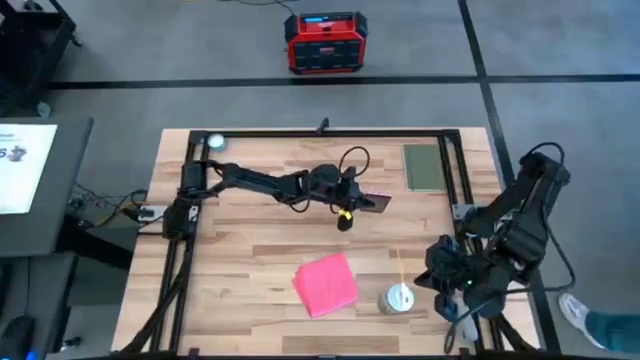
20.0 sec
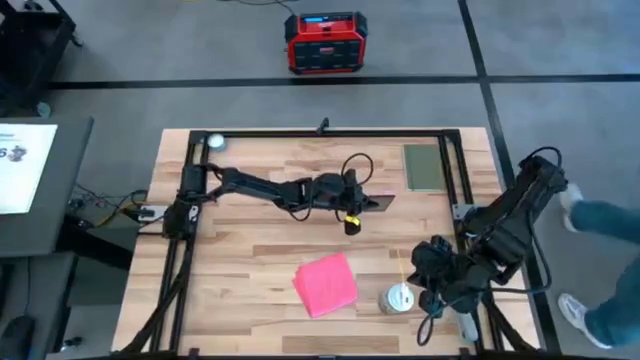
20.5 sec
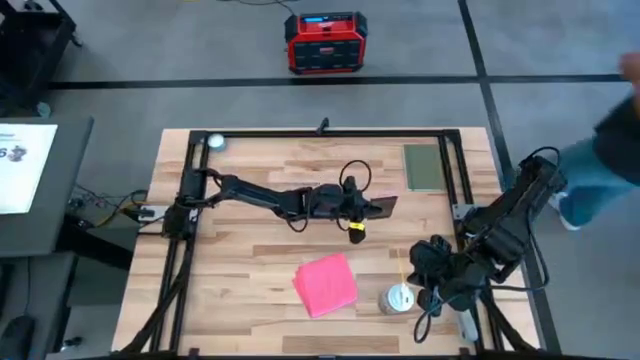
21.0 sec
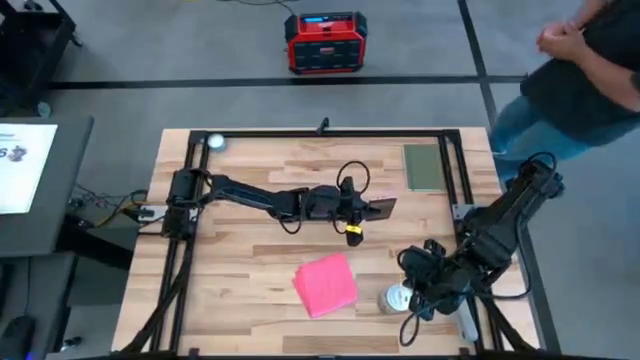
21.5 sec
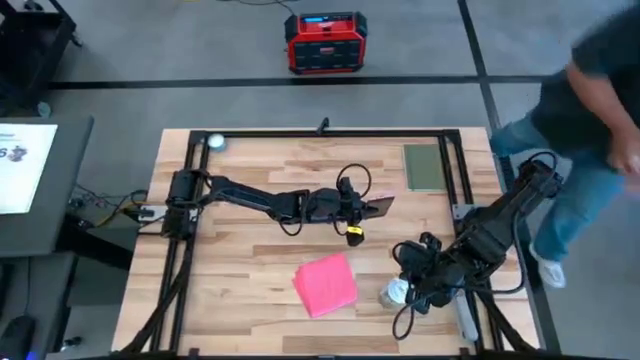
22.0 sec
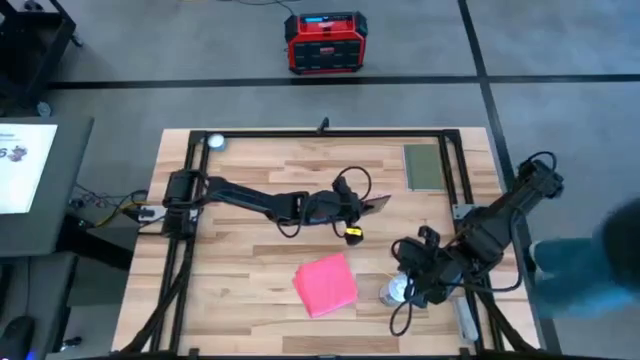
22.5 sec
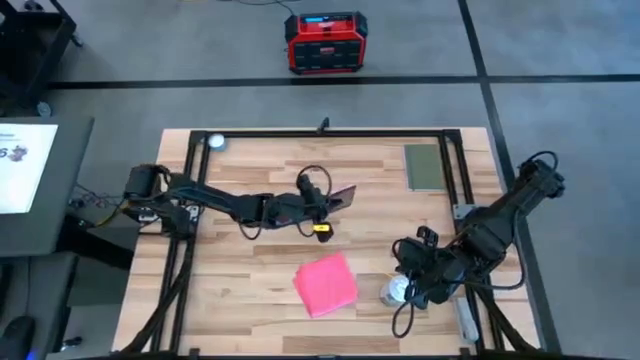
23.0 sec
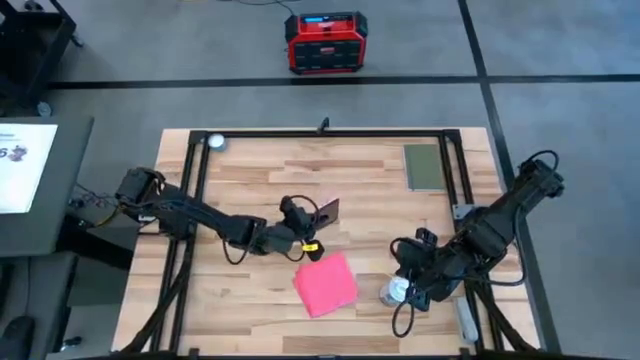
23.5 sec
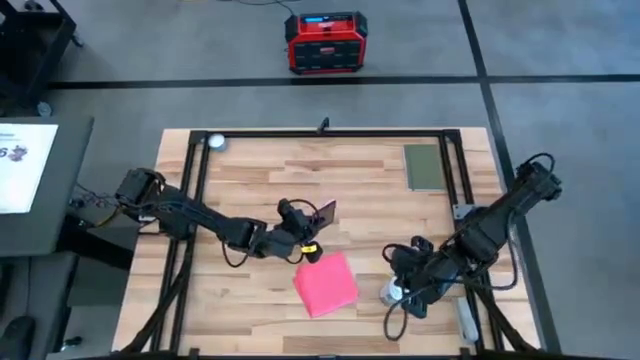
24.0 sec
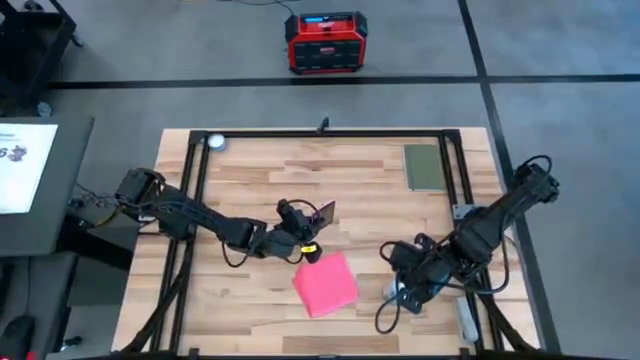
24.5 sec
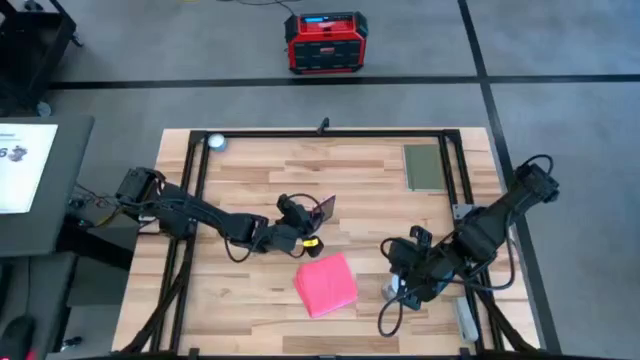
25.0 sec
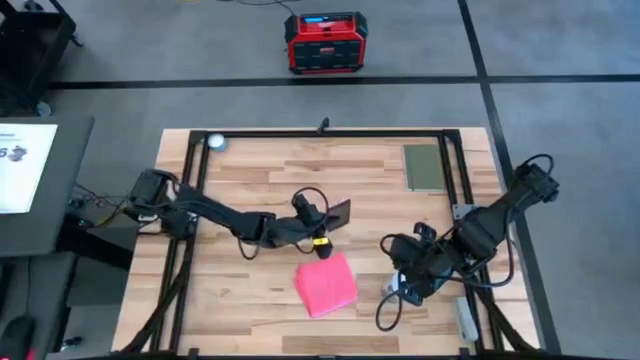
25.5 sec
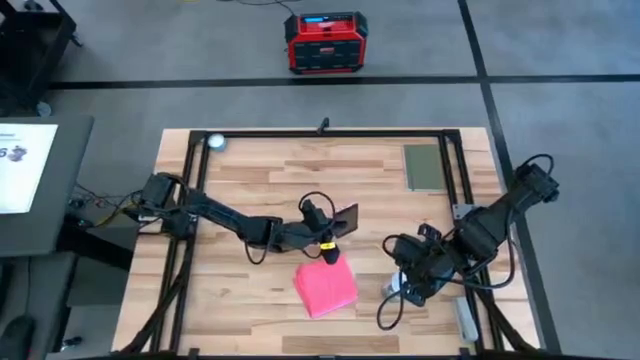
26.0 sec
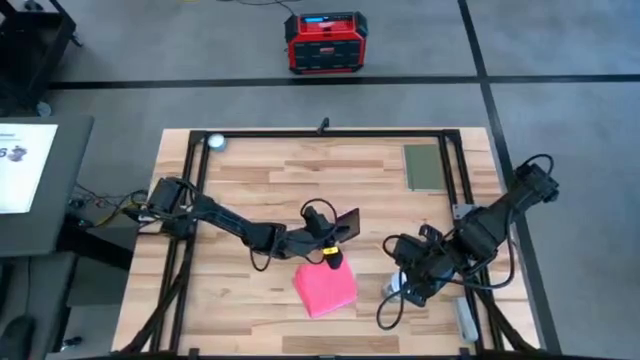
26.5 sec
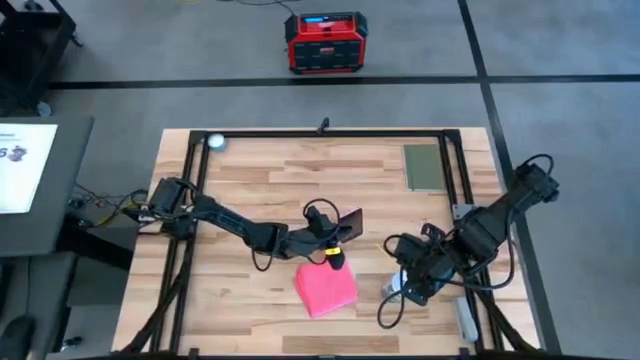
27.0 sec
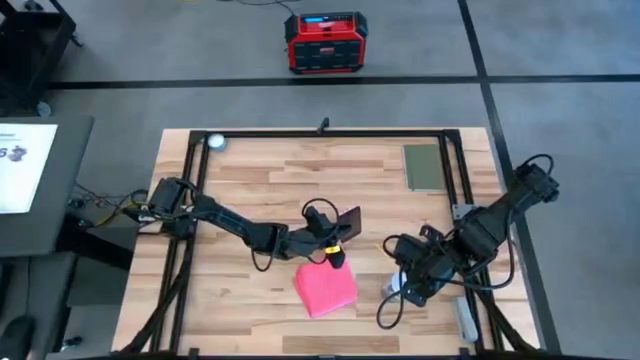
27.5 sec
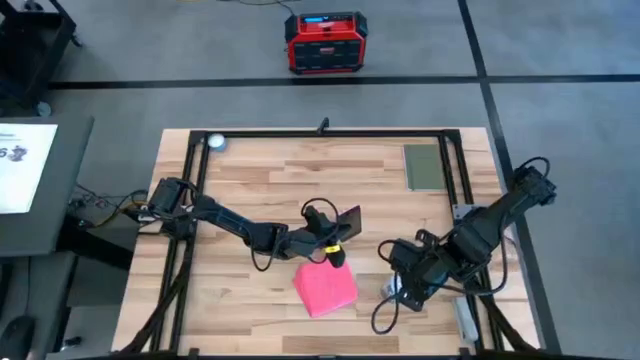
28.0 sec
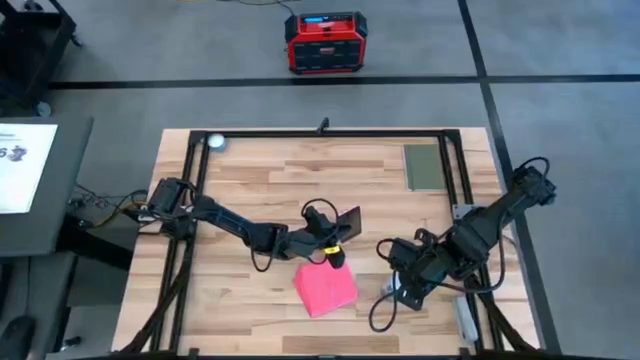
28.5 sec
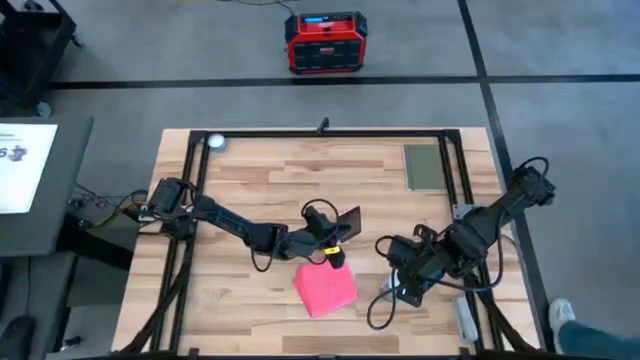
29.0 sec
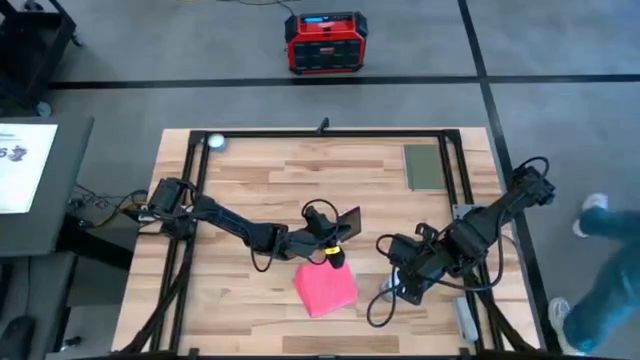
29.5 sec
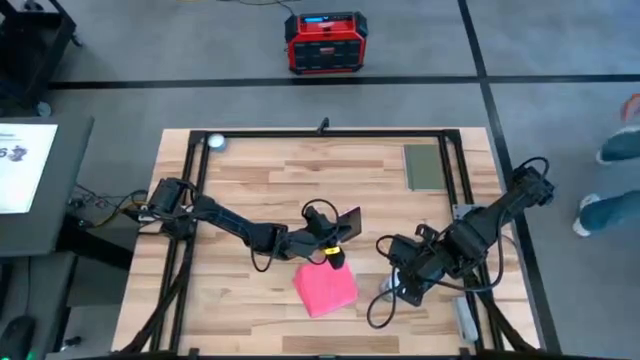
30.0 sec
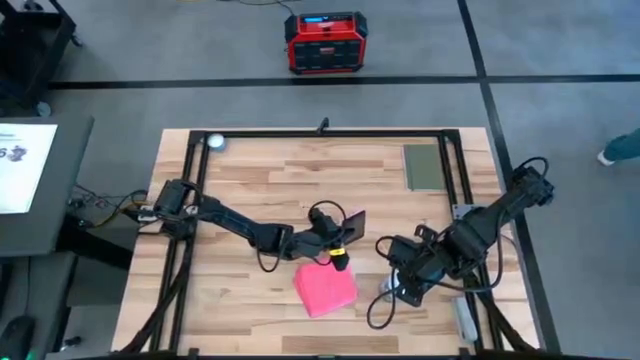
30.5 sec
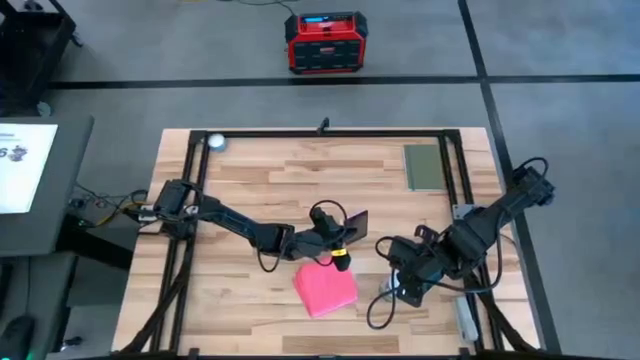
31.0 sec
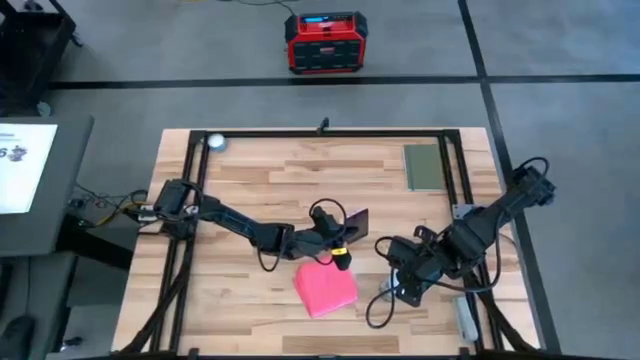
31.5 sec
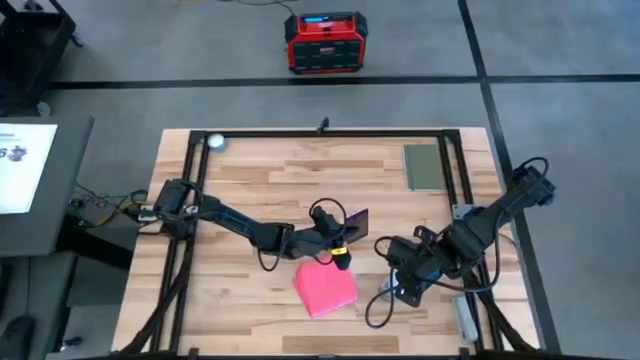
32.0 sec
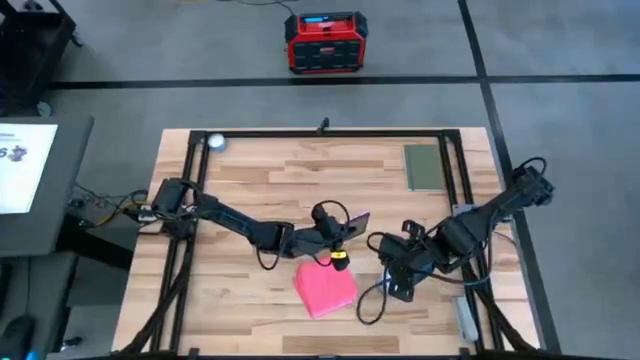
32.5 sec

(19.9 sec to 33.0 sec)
Task: Apply microfiber cloth
Spray the front of the pink phone using the spray bottle

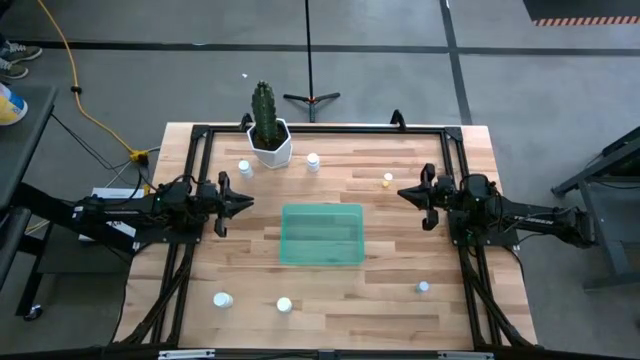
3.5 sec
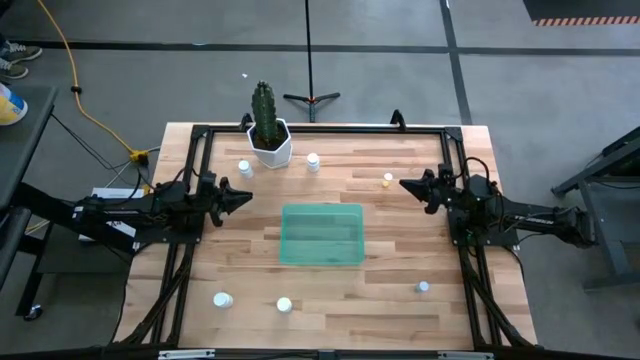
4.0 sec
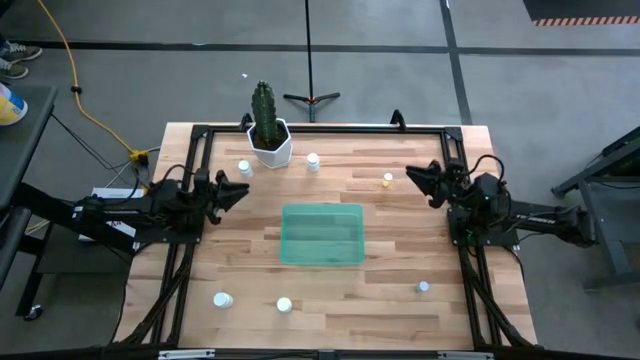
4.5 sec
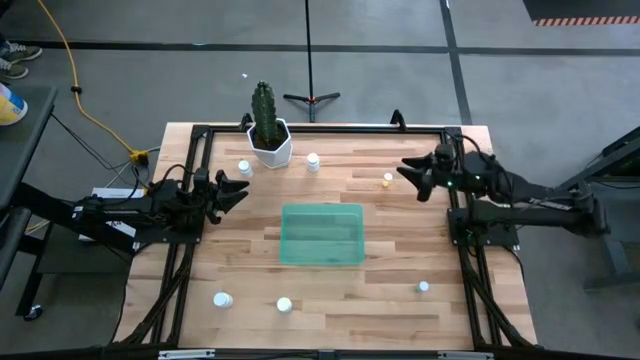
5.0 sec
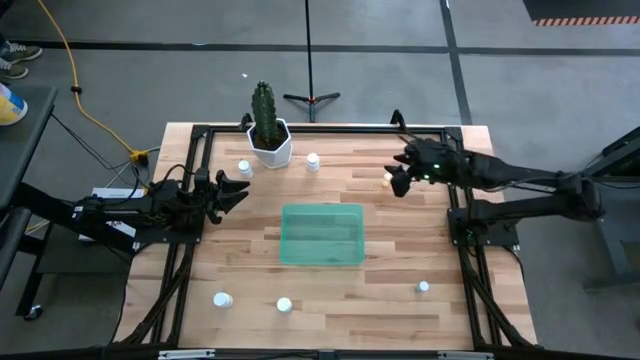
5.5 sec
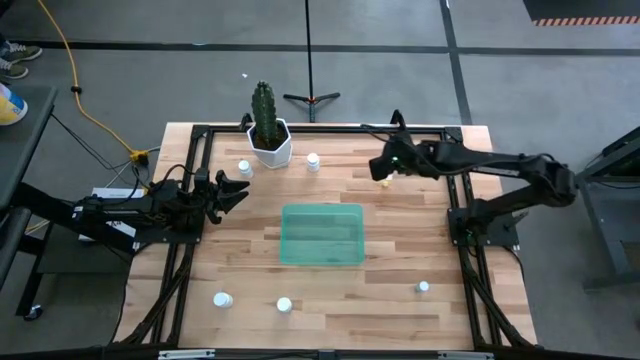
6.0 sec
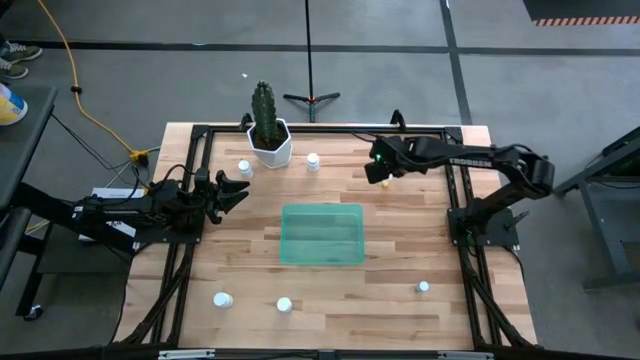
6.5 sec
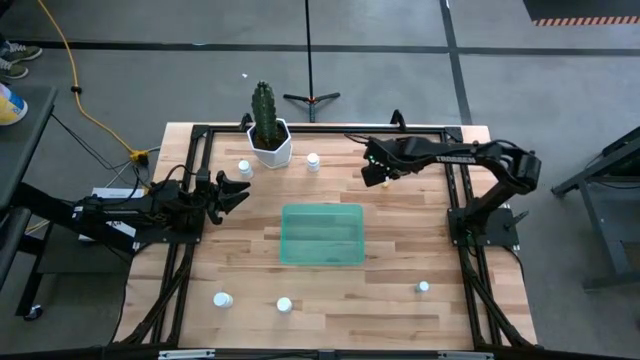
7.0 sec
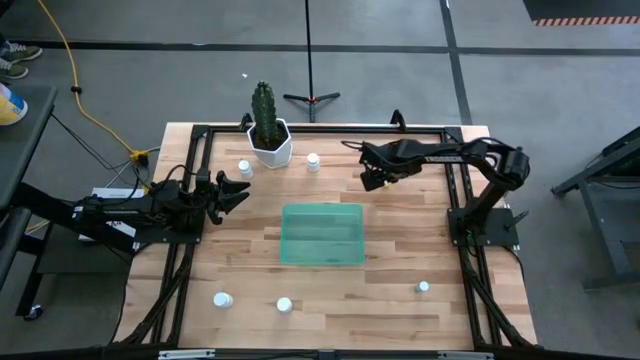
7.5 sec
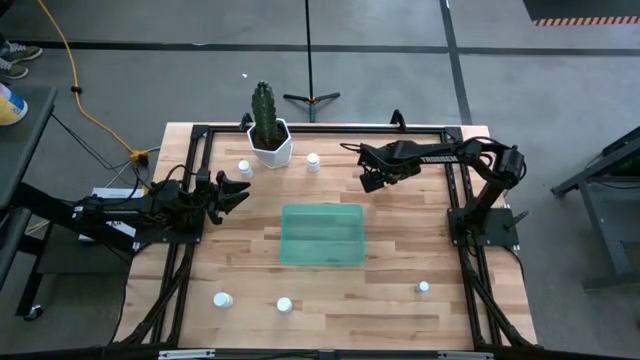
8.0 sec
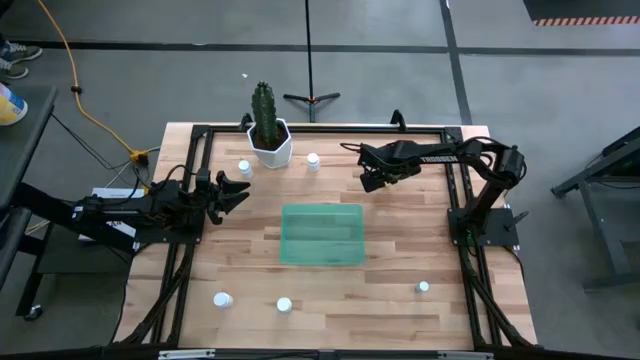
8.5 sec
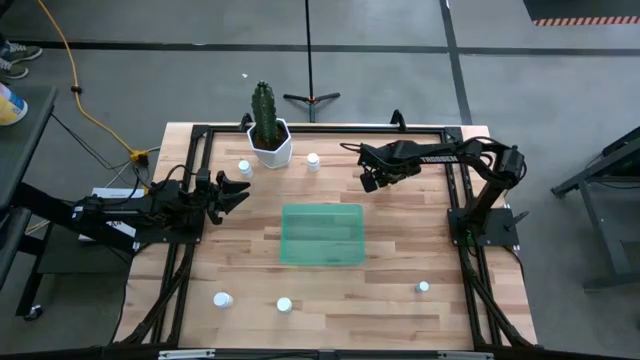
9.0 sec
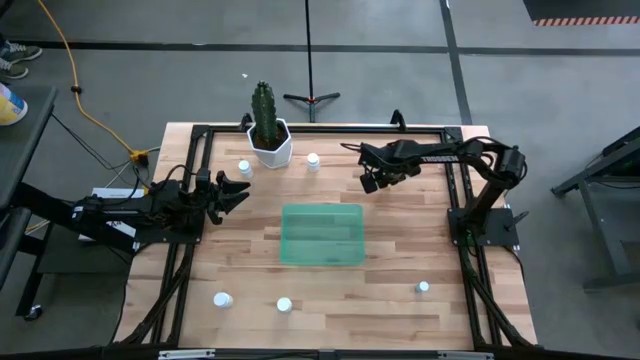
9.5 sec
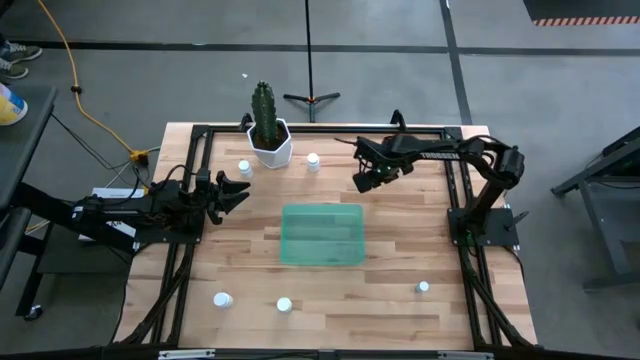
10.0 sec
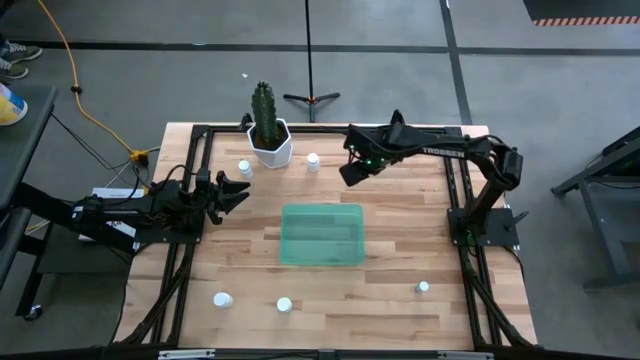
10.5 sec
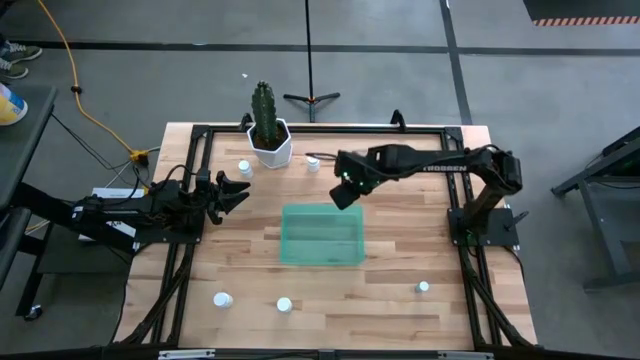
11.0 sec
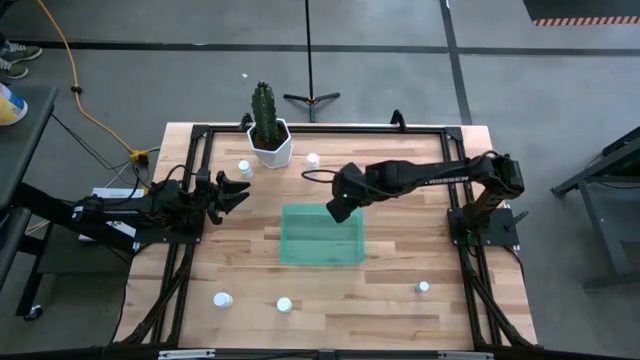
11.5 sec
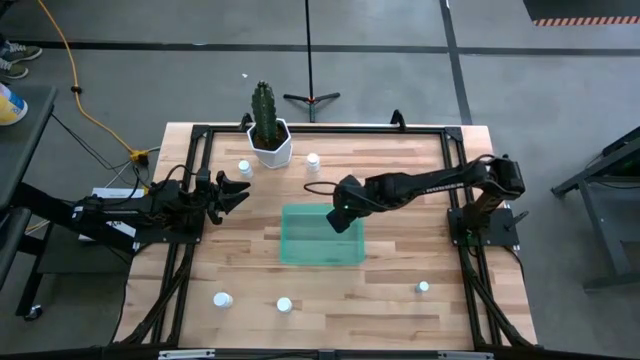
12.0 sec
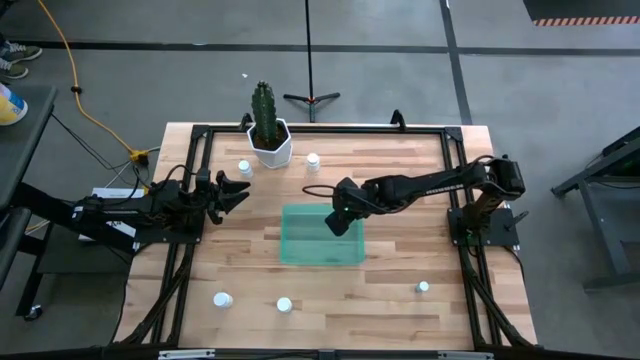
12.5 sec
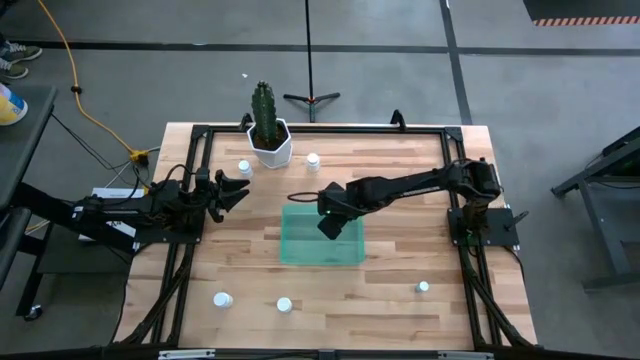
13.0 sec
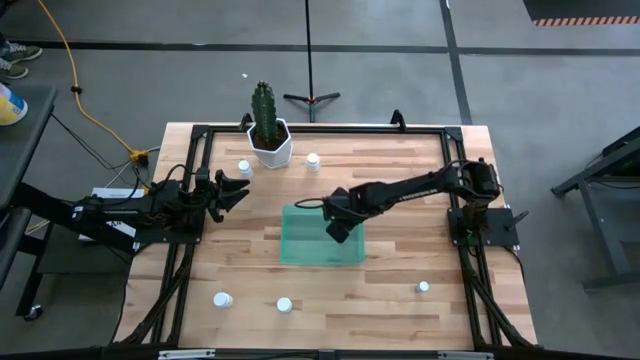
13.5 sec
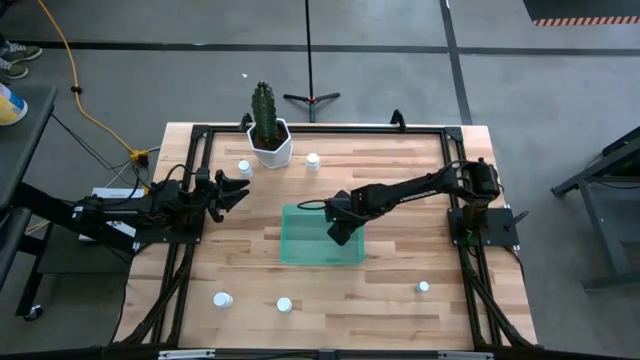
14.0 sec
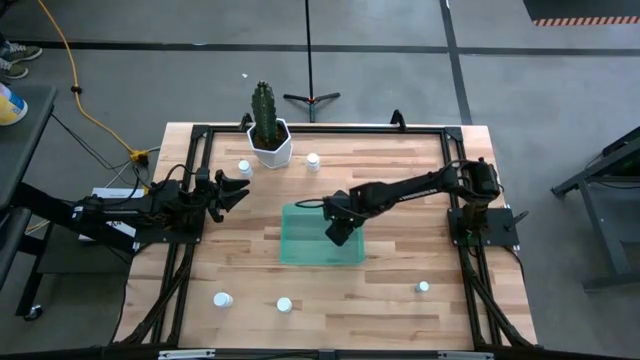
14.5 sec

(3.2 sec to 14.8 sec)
Task: Pick and place pill bottles into a basket
Put the yellow pill bottle into the blue bin
